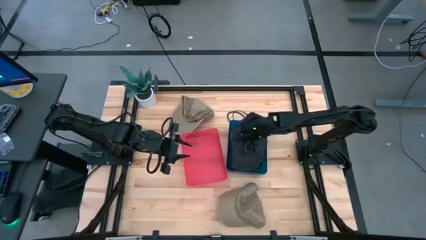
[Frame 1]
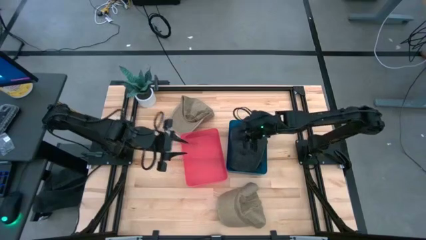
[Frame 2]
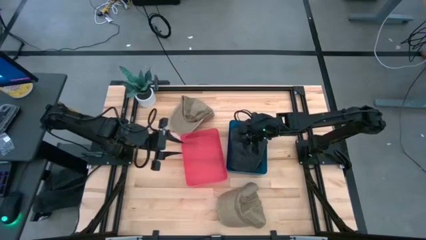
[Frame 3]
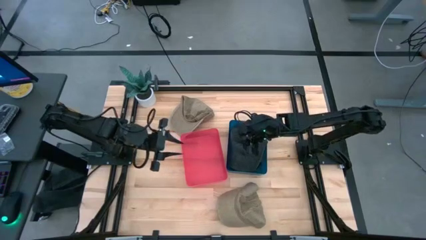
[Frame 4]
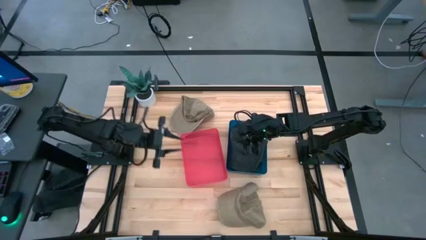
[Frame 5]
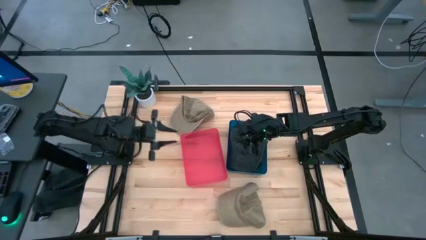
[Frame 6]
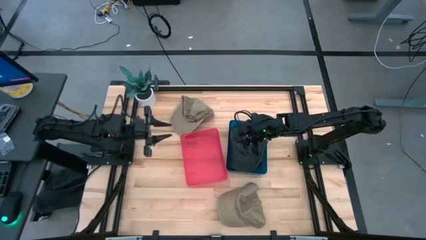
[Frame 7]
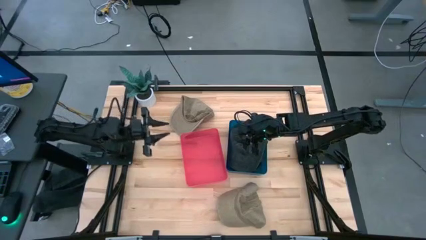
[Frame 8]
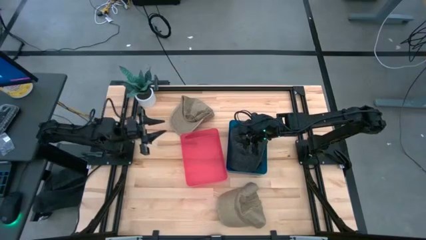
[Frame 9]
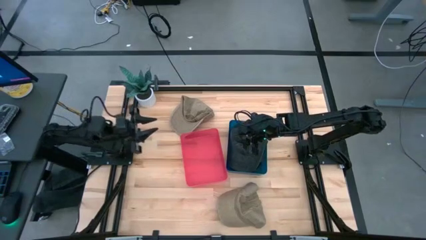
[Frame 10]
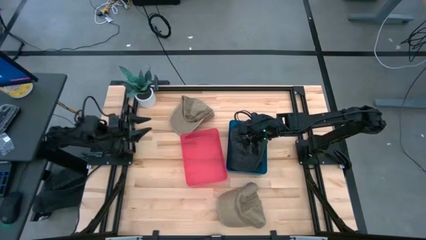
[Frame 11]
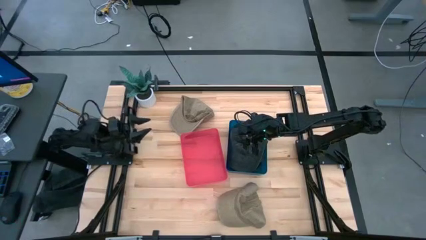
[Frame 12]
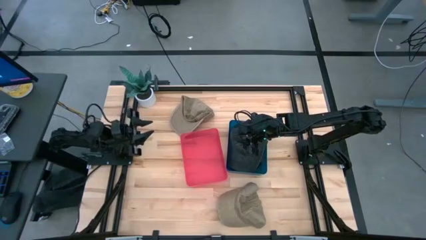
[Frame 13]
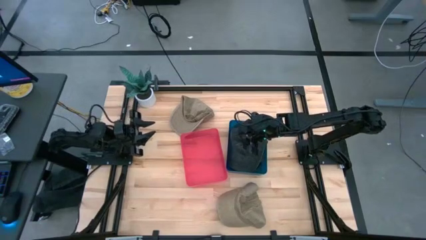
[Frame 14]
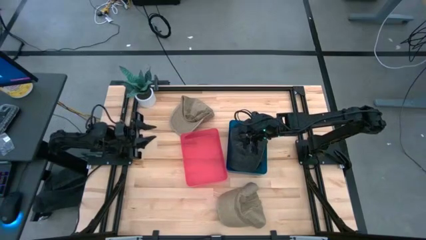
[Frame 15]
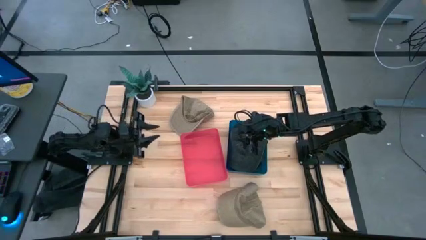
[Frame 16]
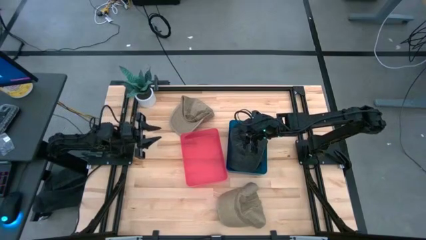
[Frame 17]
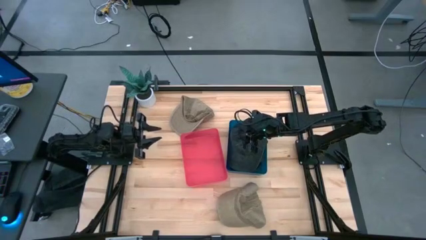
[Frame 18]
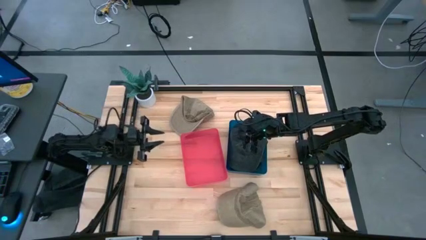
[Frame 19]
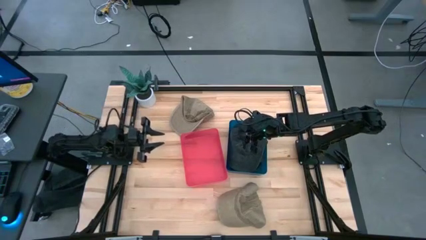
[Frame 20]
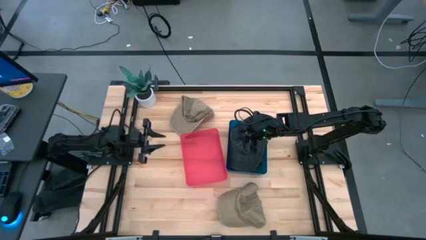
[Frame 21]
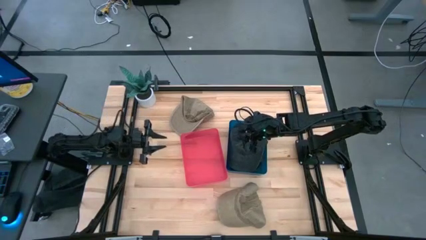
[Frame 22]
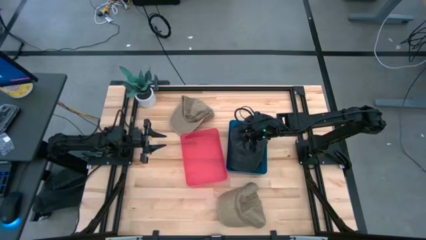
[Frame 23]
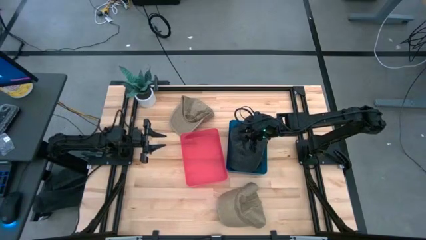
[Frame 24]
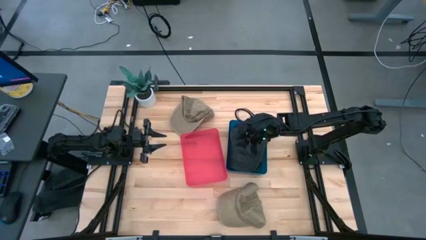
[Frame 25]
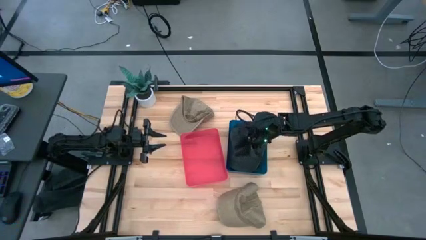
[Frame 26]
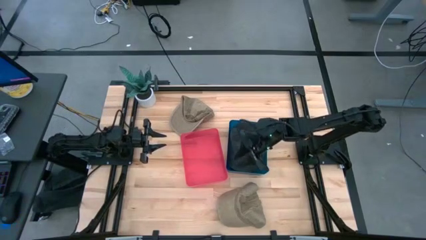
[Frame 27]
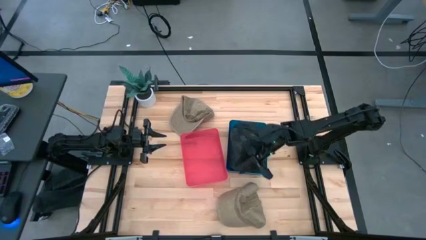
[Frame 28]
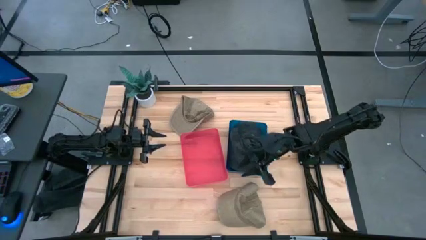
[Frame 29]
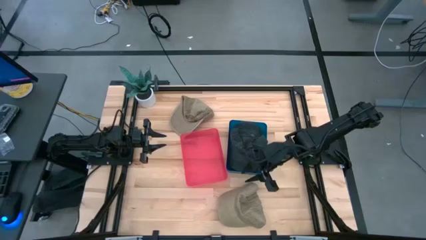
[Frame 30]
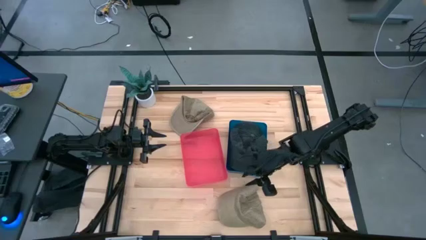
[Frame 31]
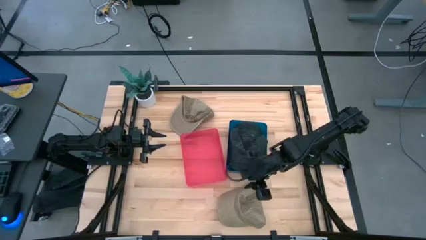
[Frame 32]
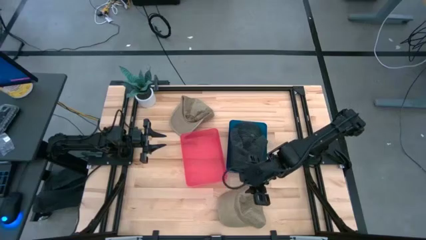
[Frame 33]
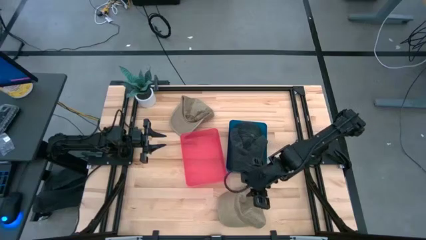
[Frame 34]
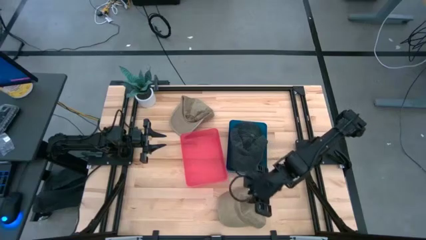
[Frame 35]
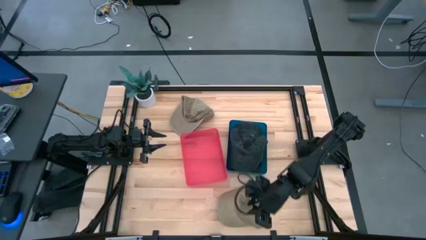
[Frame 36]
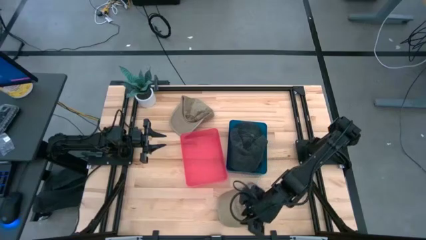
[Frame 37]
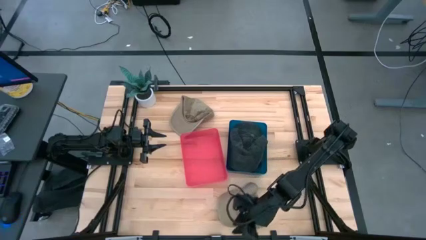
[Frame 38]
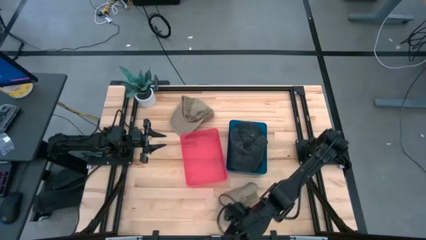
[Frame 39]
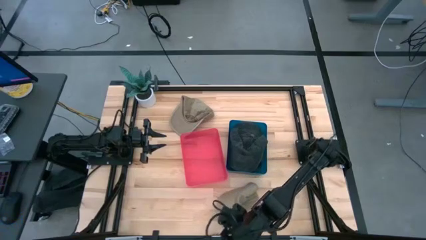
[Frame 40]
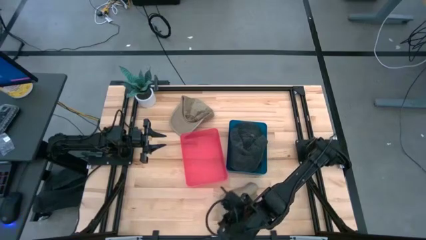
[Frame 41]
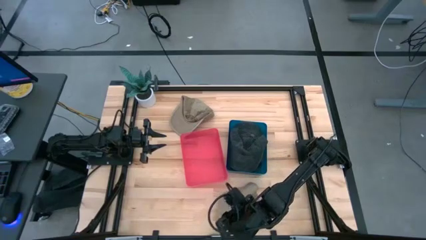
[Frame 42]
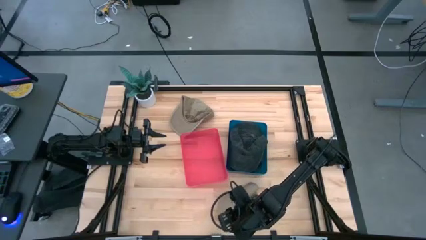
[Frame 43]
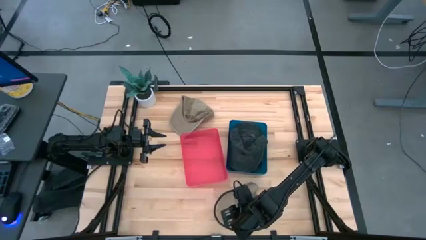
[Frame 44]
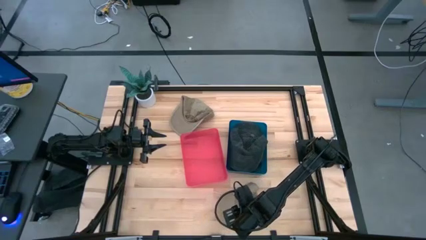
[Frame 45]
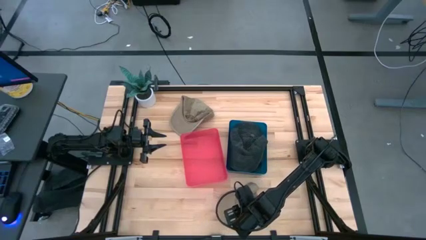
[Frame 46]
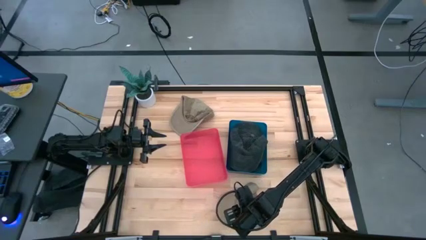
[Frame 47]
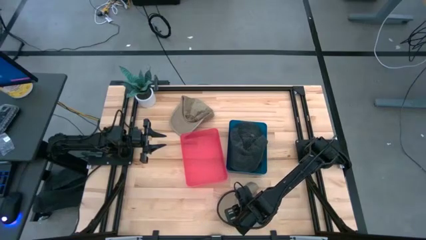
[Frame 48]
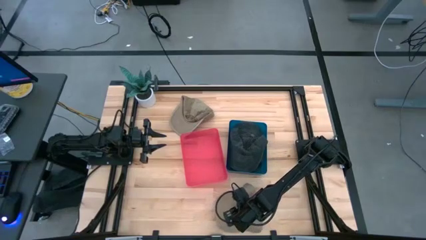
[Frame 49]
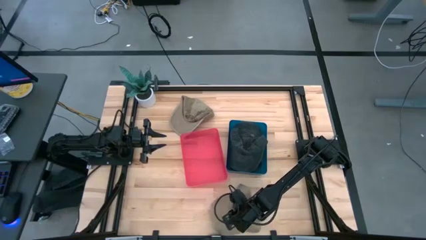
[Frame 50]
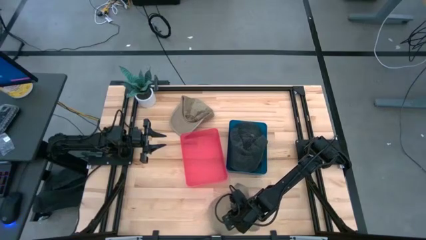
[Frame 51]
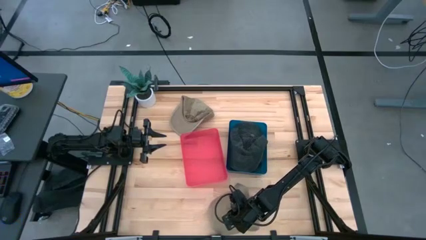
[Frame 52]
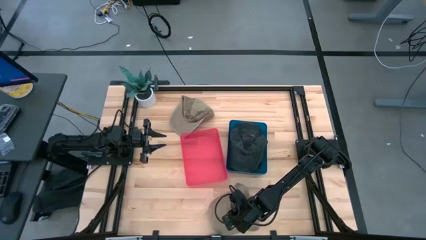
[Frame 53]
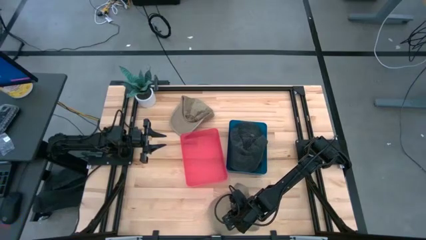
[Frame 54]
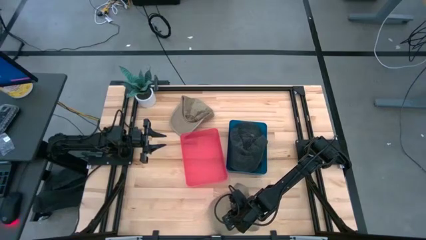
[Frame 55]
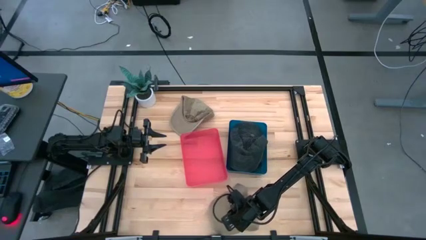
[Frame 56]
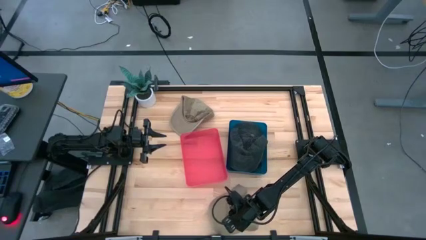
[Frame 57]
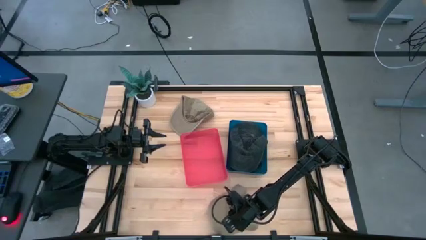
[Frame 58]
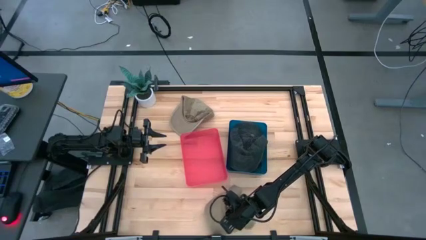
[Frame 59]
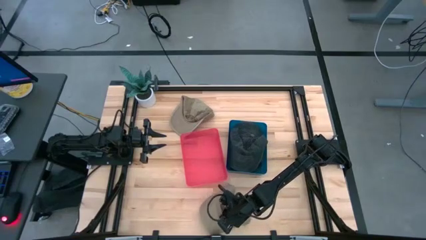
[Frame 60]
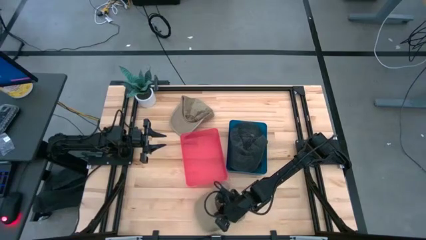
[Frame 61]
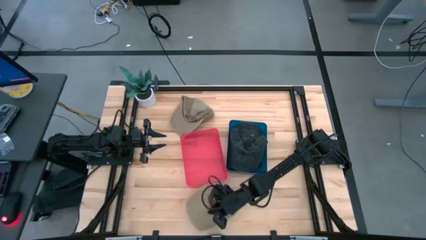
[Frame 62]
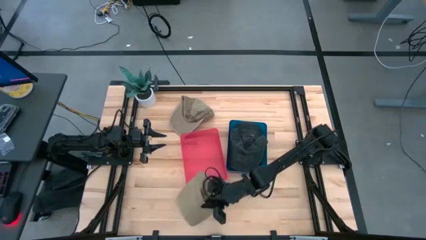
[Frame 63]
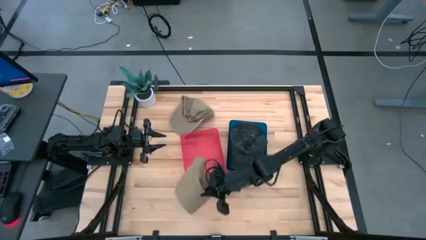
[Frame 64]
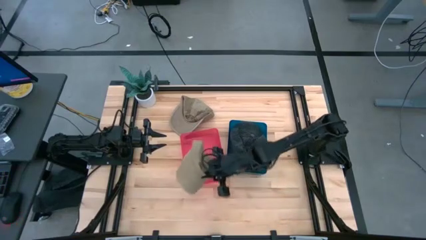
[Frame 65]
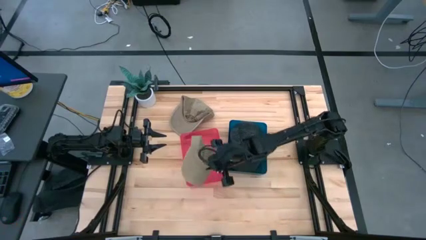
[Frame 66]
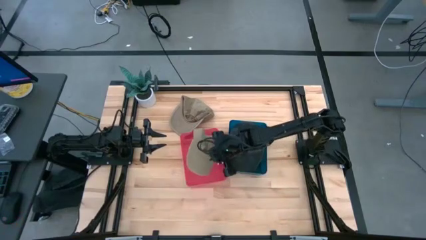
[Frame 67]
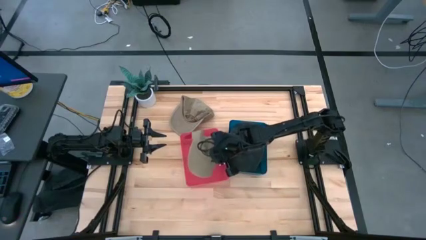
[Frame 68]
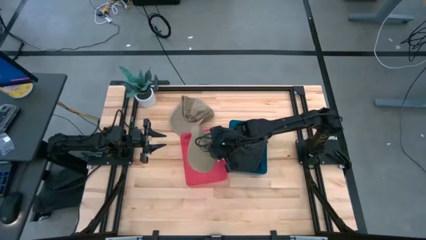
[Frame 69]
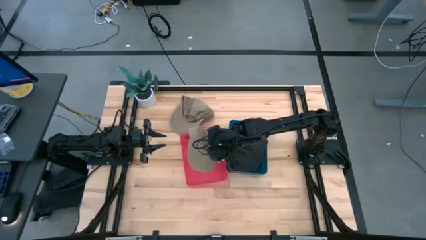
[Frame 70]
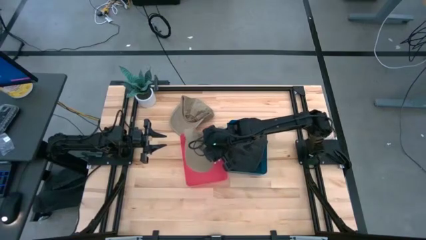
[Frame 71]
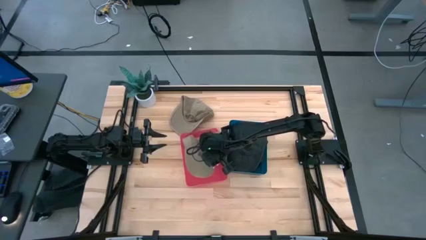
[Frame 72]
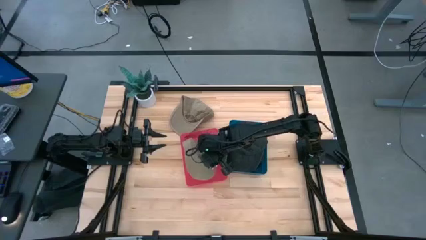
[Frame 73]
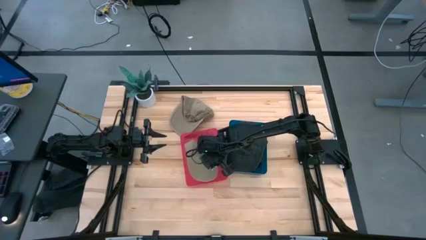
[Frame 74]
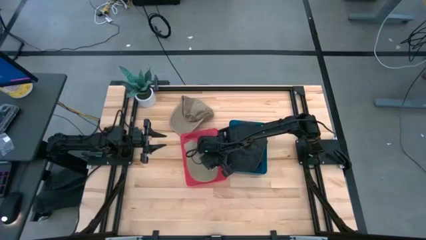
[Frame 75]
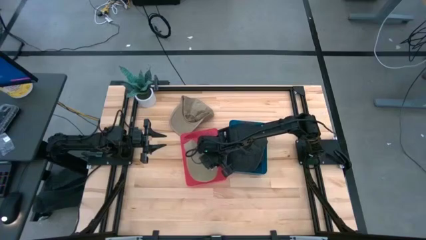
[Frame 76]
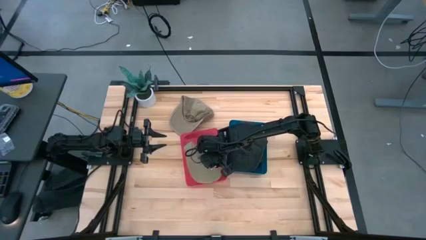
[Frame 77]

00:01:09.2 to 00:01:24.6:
Task: Pick & Place hat
Put the bottom brown cap into the red bin
